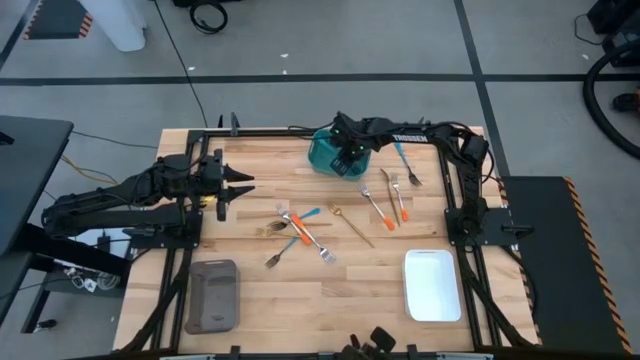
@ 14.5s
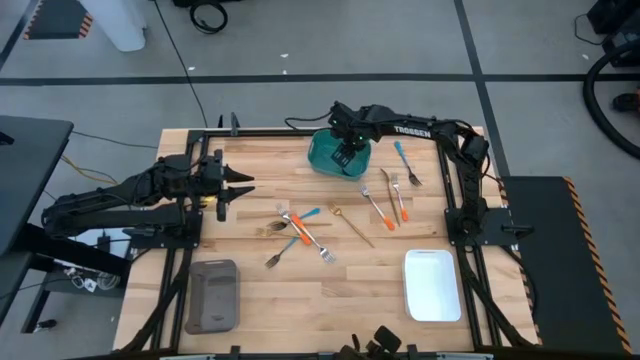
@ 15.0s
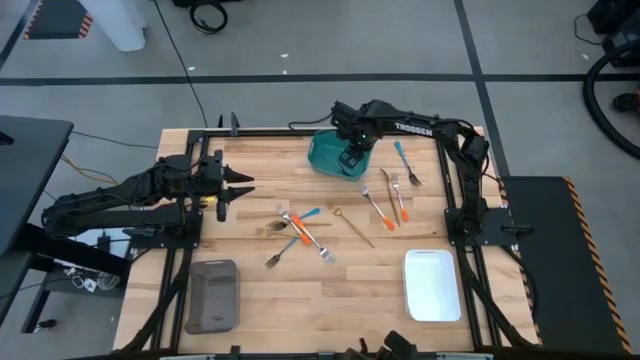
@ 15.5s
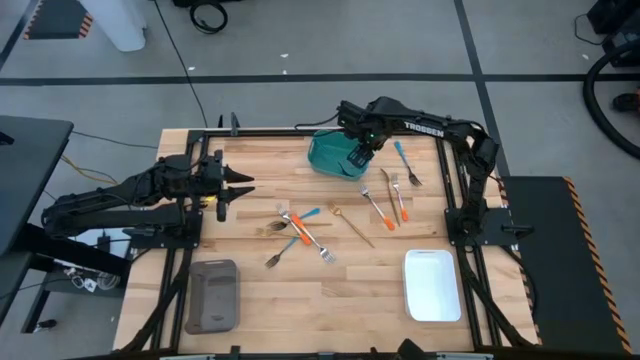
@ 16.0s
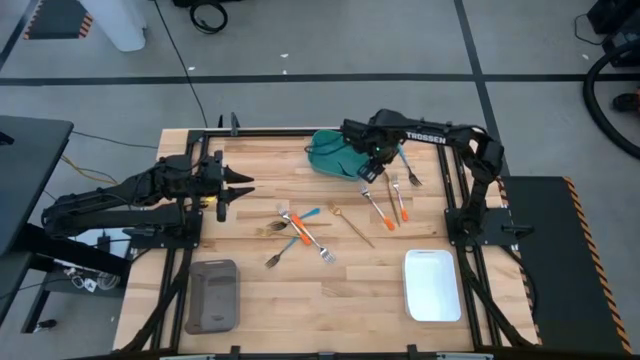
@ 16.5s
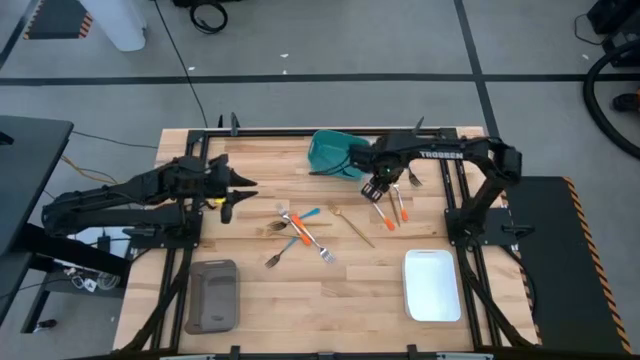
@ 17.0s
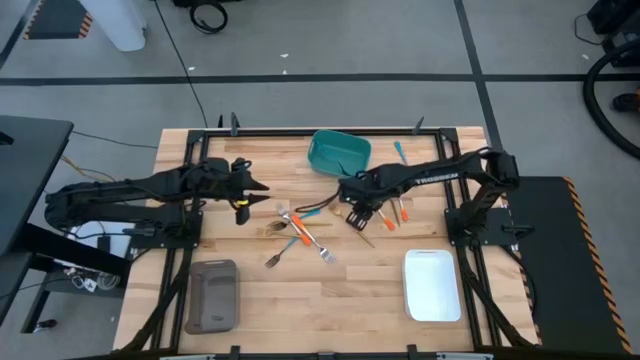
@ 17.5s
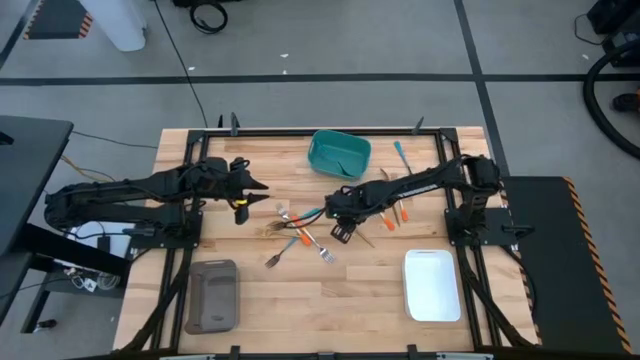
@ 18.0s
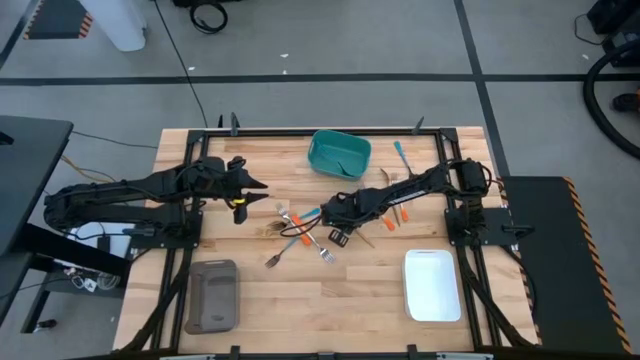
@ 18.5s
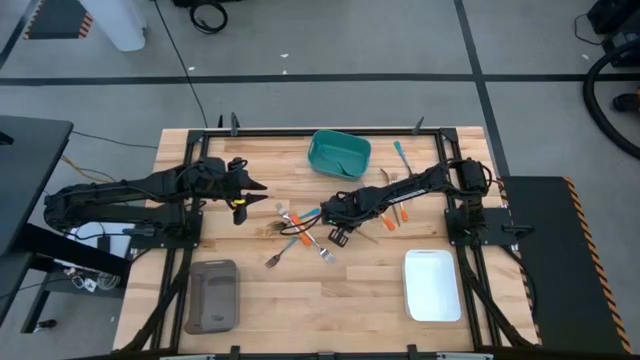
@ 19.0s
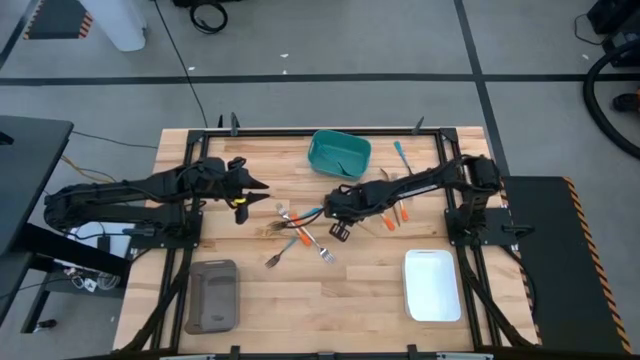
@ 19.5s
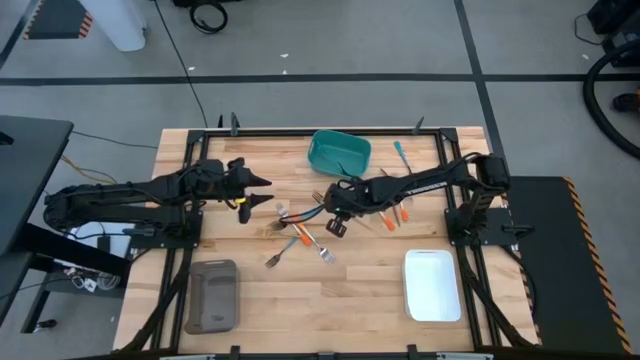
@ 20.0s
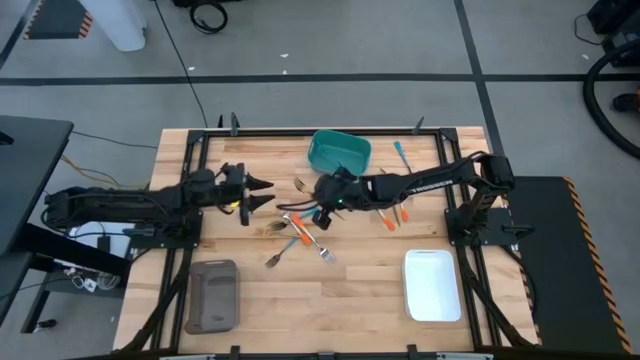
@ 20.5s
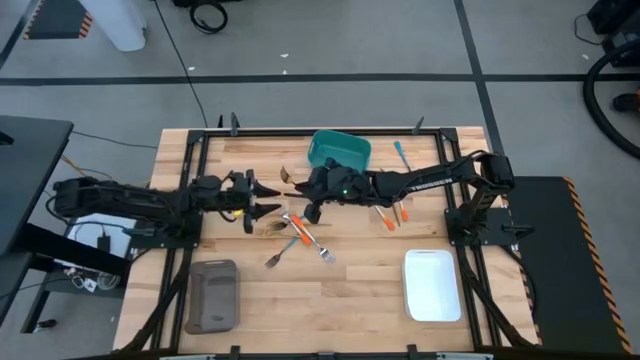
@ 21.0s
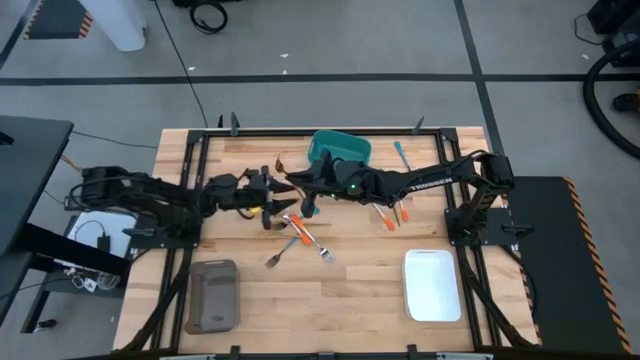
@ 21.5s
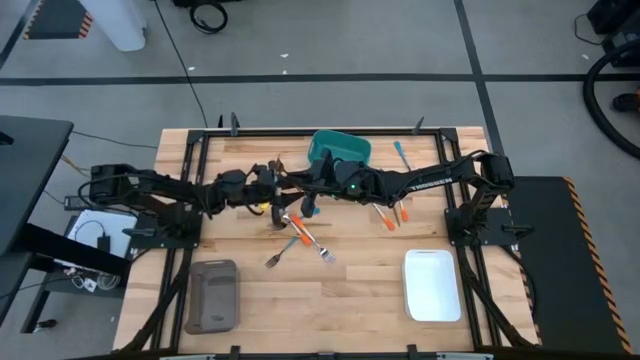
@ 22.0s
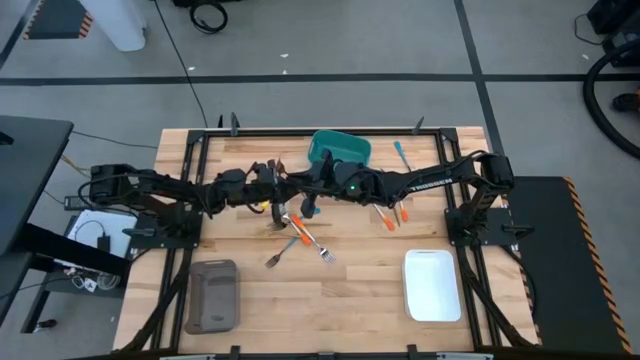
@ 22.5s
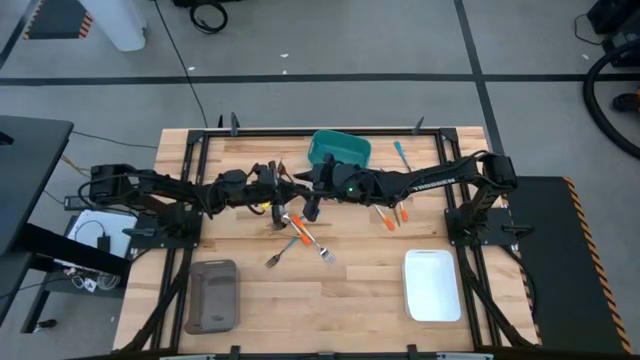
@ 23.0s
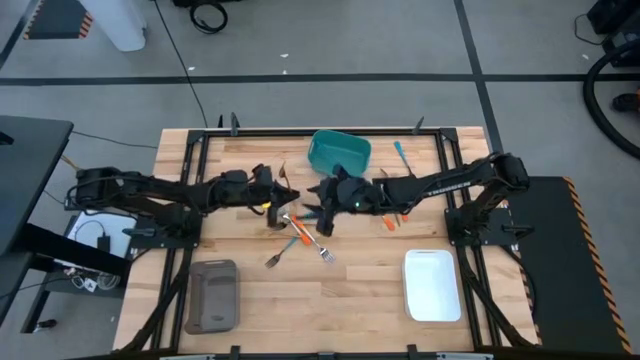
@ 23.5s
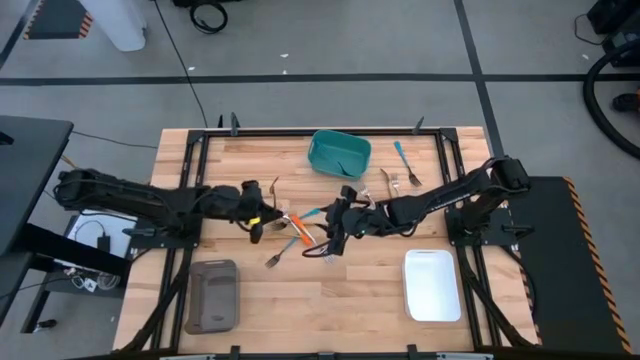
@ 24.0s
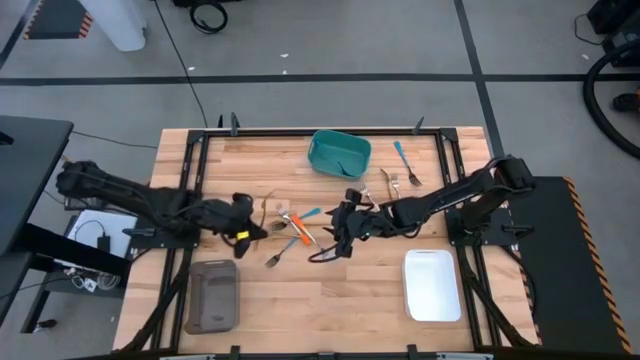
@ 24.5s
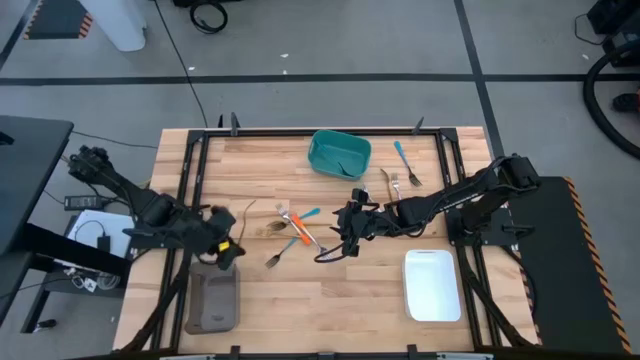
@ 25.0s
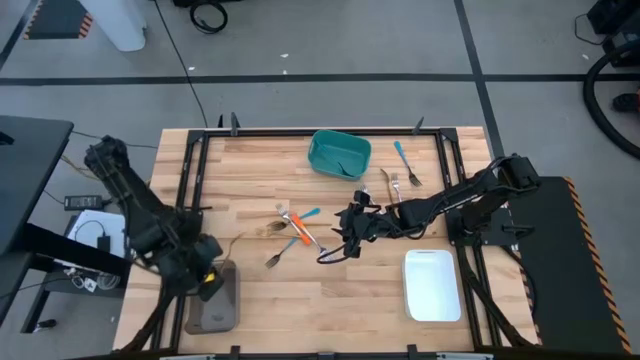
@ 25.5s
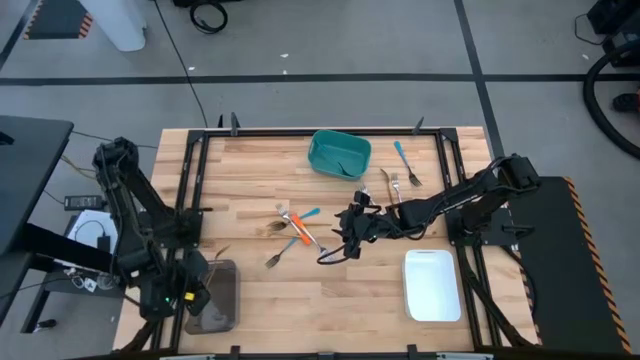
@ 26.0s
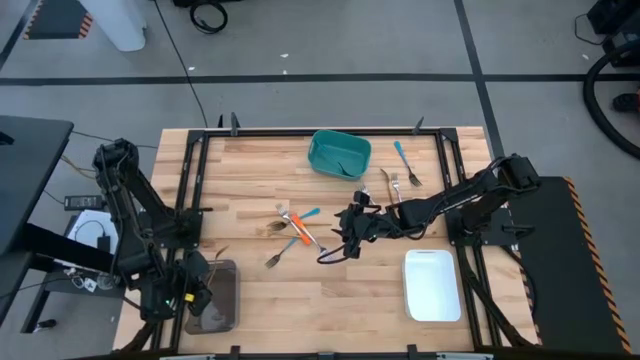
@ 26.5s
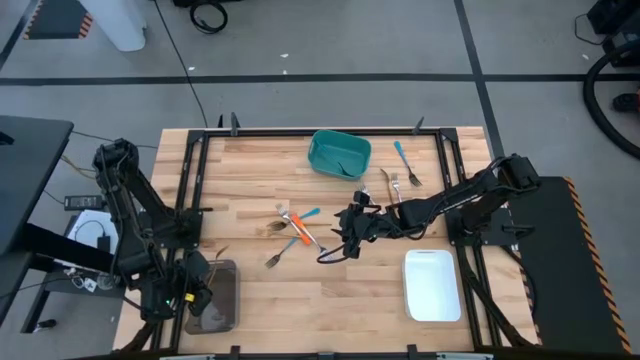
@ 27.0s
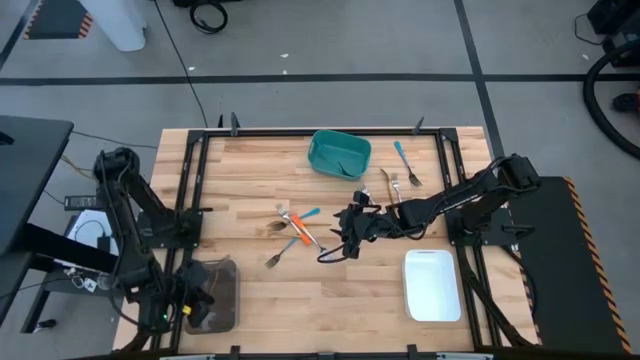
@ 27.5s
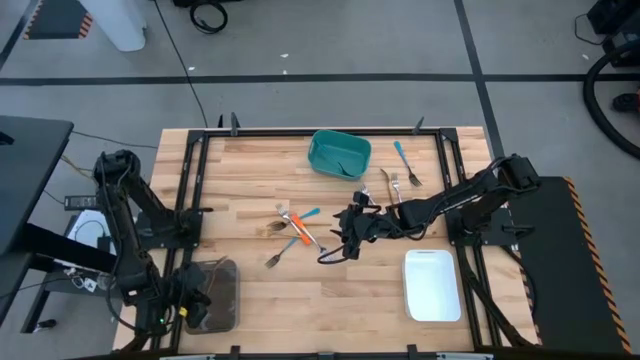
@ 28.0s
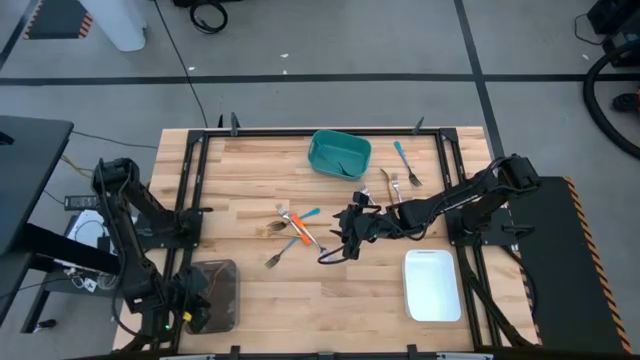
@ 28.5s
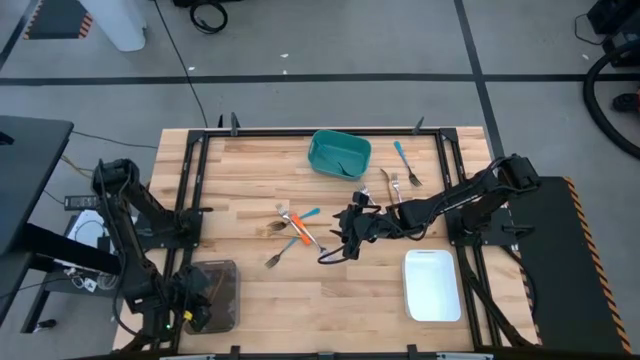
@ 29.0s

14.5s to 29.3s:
Task: Sort silverware by color (type)
Put the gold fork into the black bin

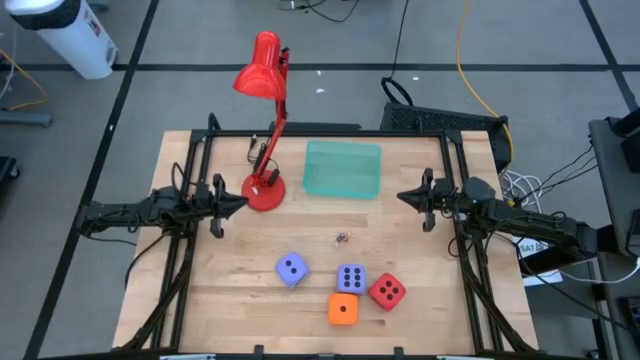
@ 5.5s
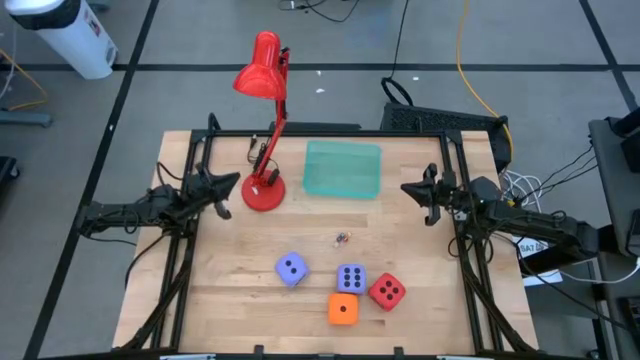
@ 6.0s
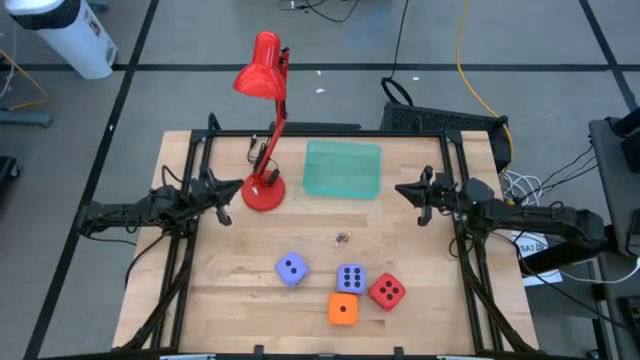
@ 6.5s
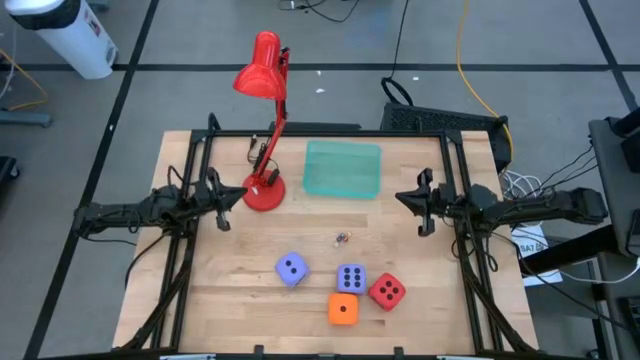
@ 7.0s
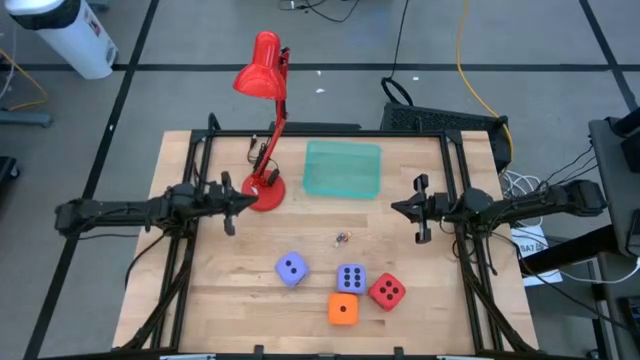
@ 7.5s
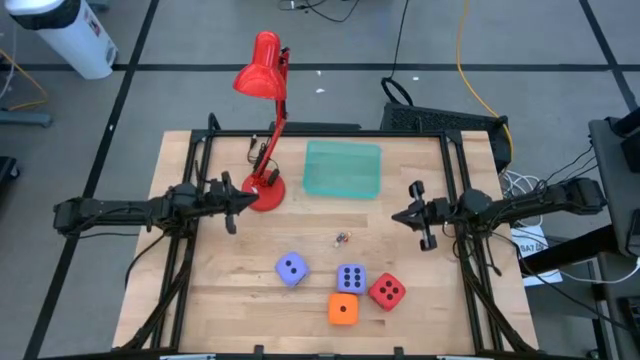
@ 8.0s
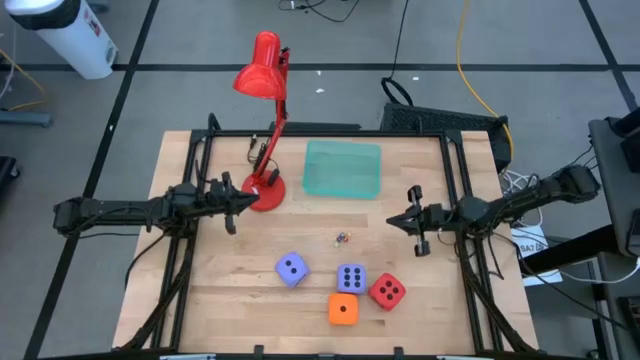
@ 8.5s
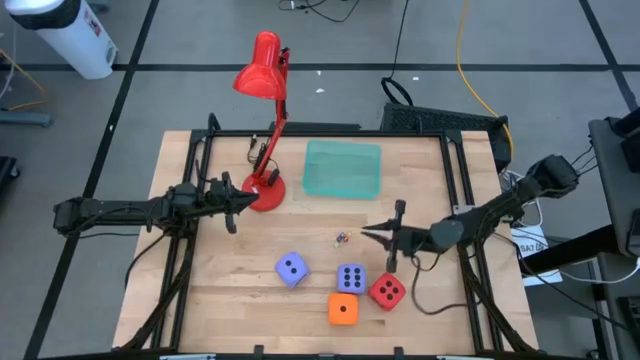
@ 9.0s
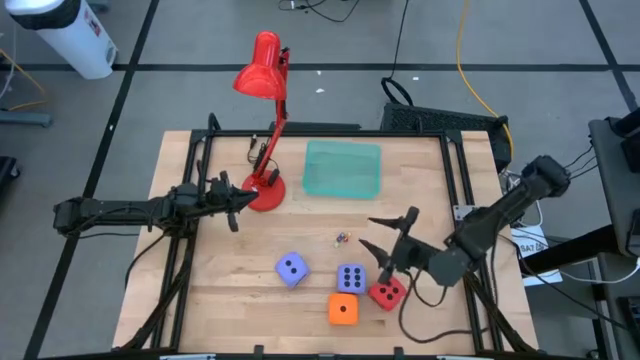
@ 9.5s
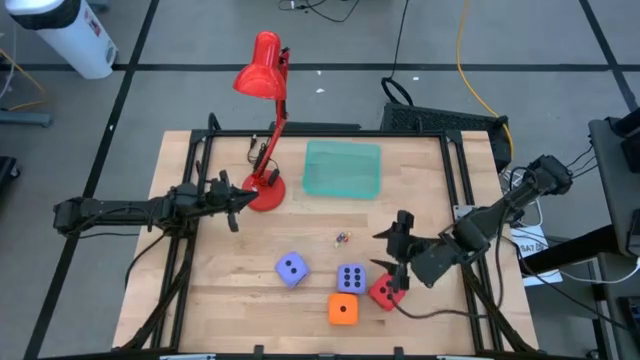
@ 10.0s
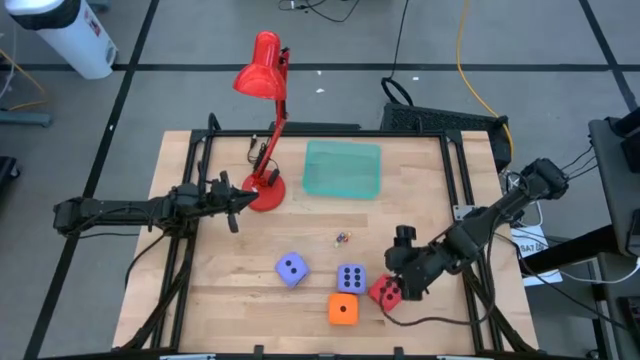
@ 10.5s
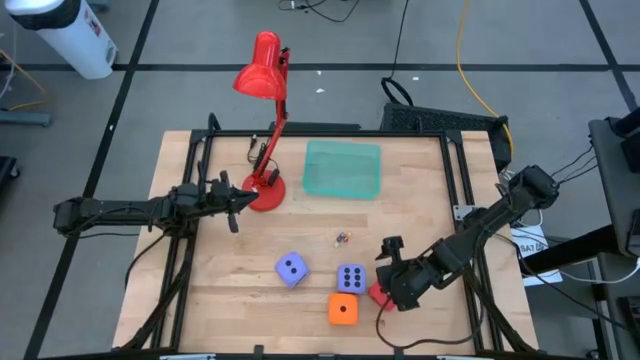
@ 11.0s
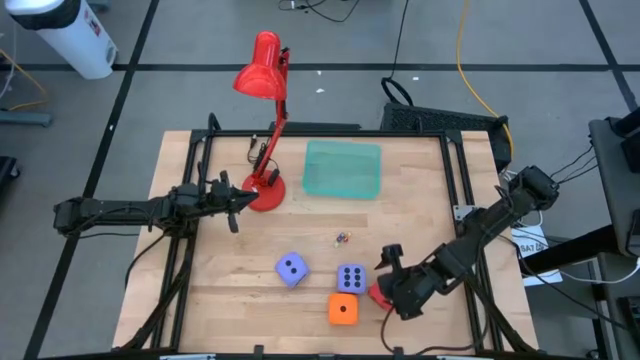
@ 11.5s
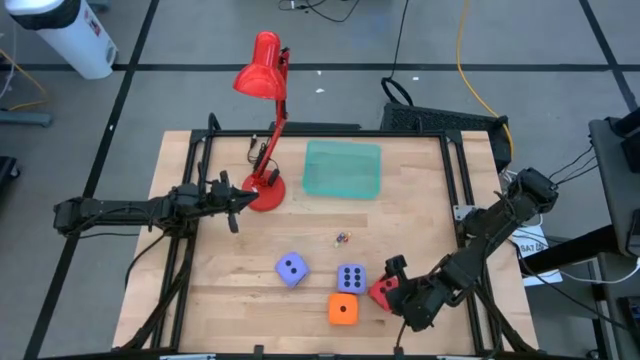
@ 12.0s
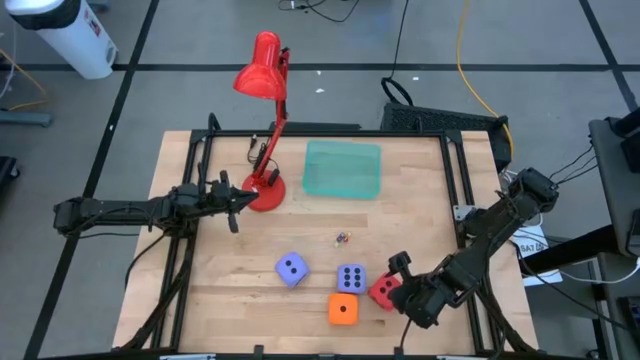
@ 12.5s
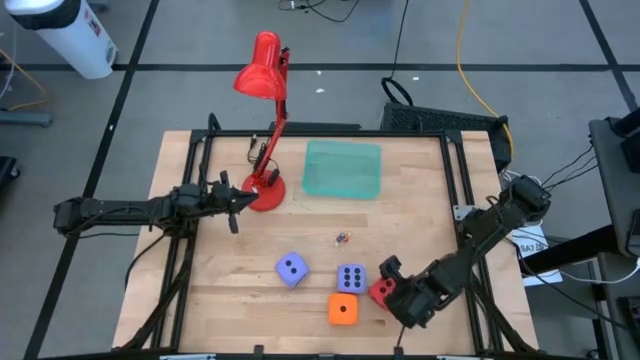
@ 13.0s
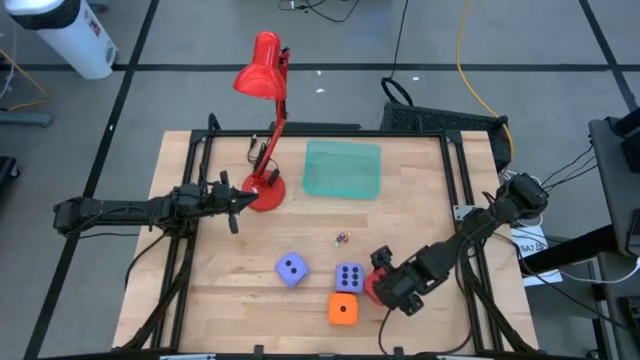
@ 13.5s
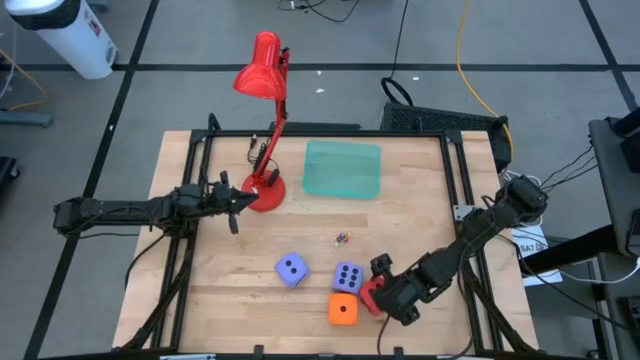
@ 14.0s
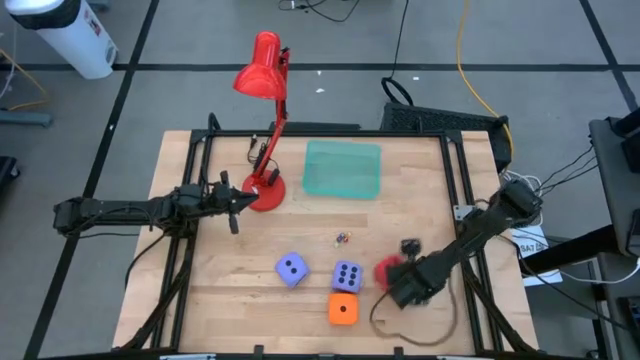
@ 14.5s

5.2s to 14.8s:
Task: Pick & Place Dice
Put the red die into the green bin
